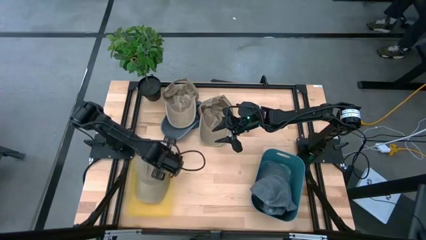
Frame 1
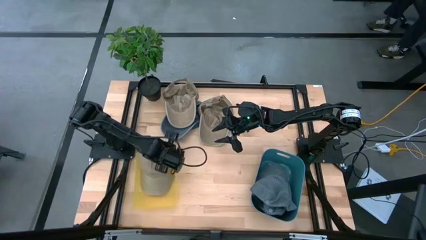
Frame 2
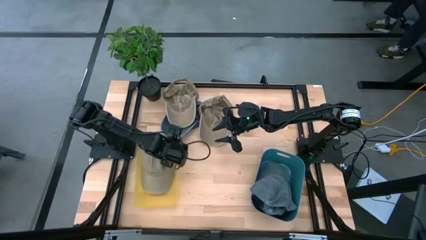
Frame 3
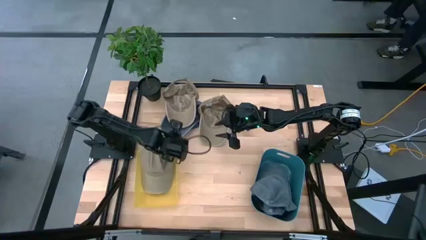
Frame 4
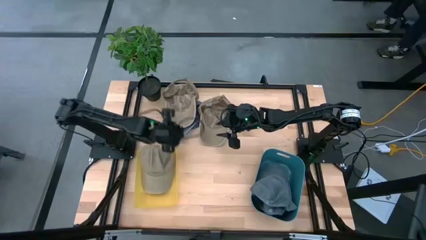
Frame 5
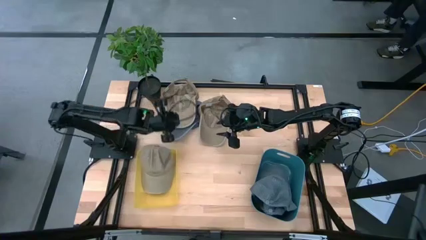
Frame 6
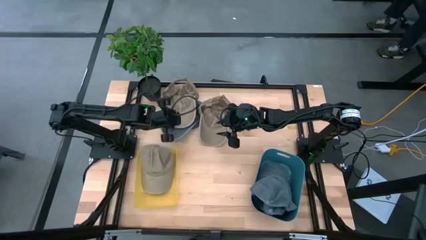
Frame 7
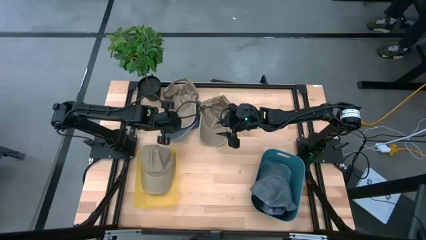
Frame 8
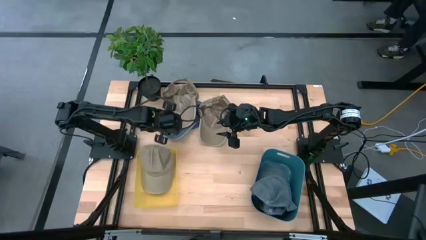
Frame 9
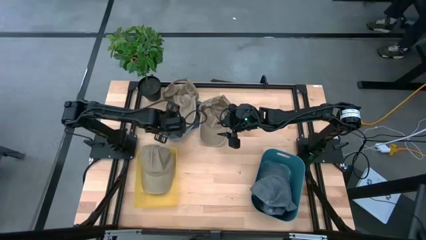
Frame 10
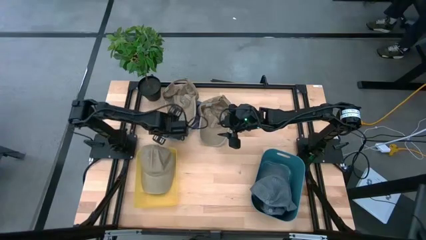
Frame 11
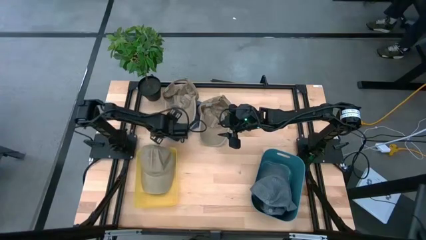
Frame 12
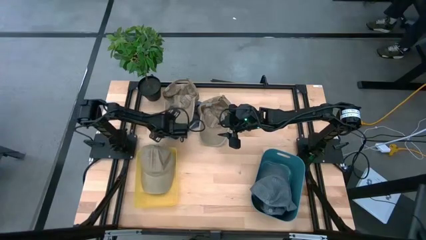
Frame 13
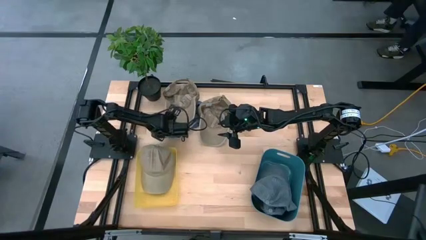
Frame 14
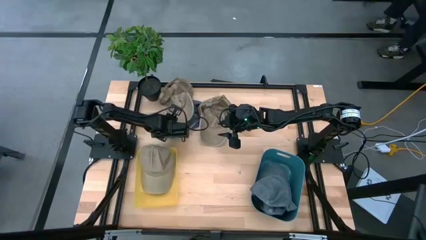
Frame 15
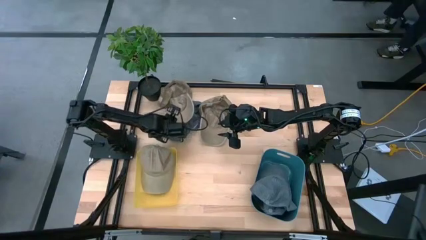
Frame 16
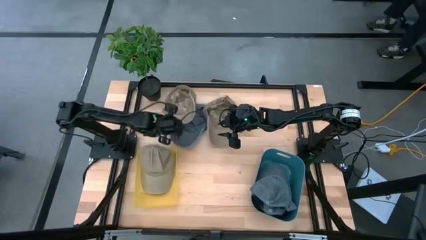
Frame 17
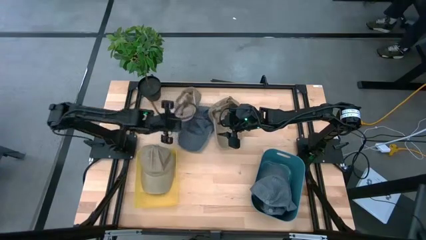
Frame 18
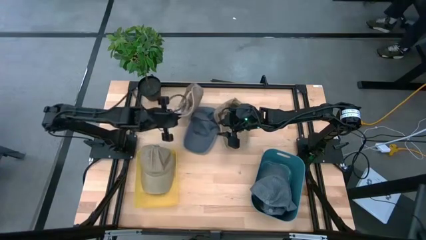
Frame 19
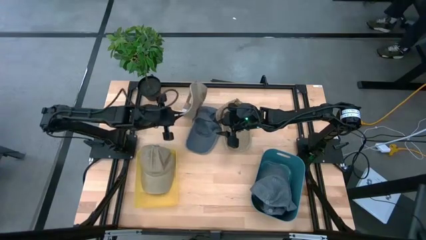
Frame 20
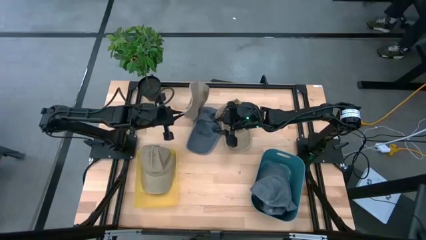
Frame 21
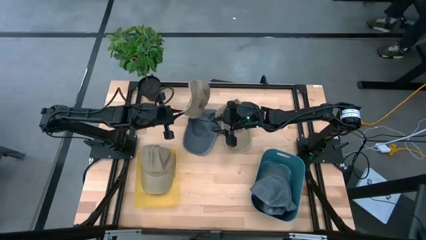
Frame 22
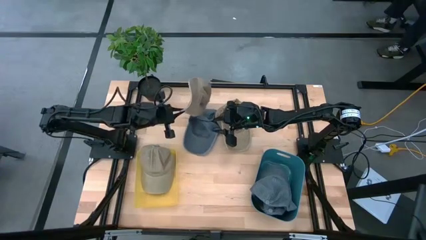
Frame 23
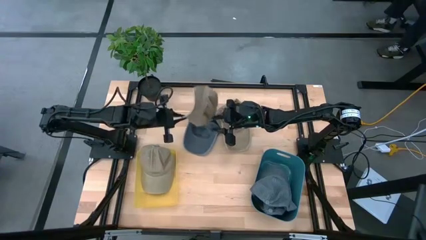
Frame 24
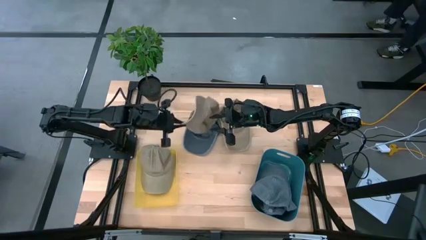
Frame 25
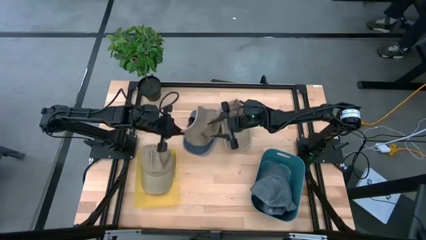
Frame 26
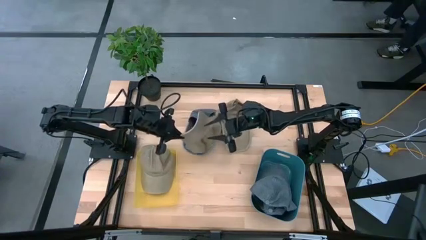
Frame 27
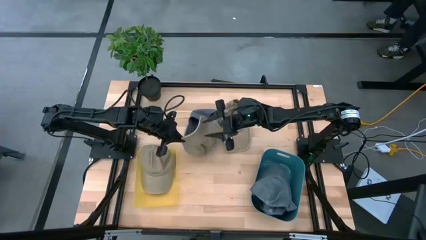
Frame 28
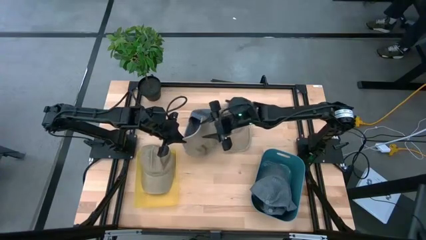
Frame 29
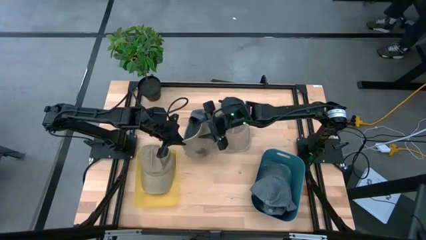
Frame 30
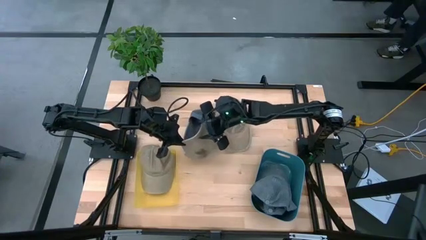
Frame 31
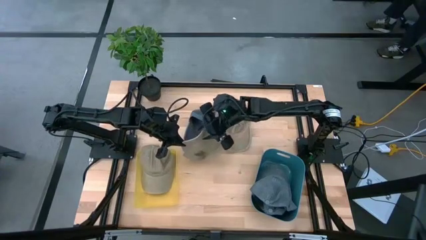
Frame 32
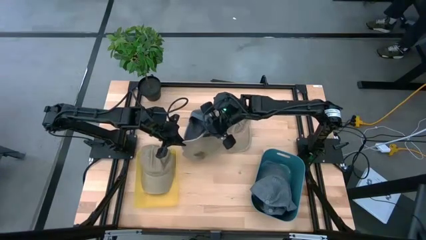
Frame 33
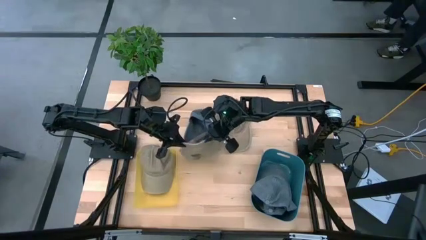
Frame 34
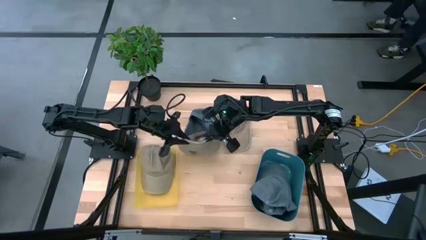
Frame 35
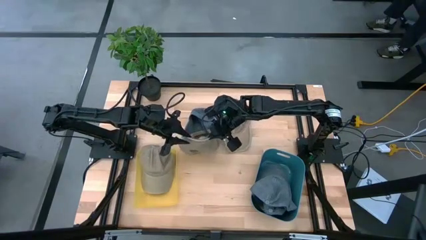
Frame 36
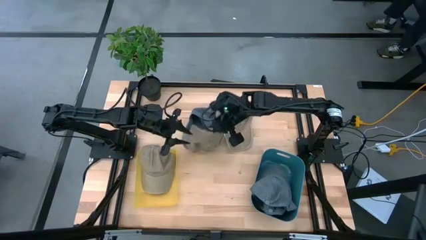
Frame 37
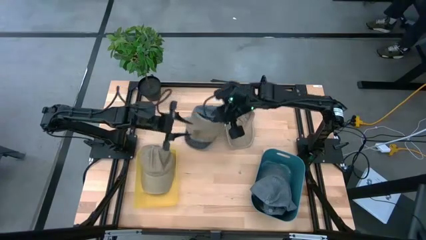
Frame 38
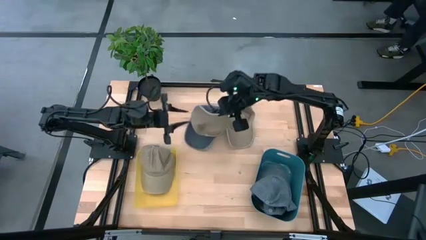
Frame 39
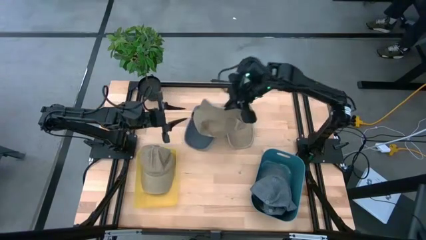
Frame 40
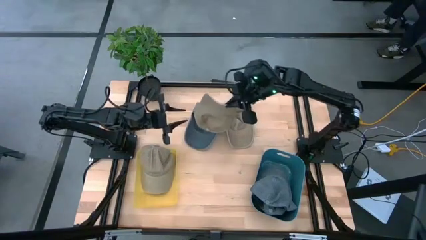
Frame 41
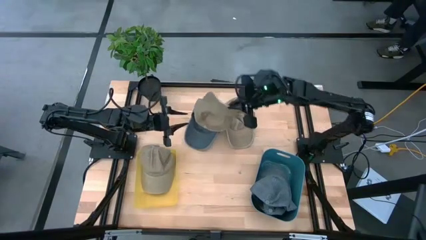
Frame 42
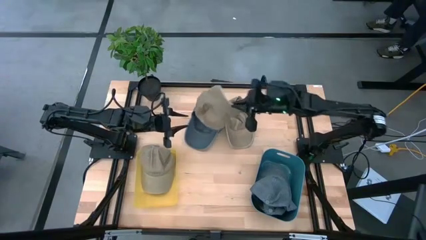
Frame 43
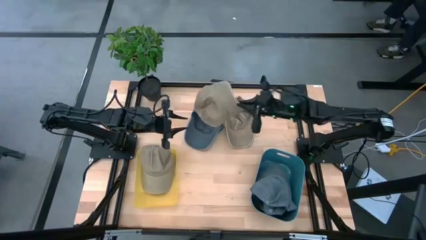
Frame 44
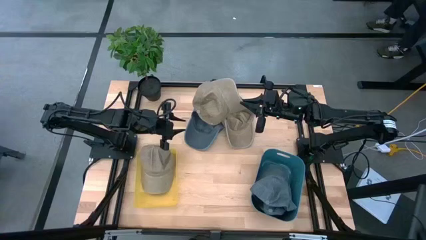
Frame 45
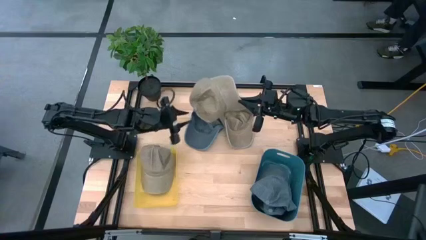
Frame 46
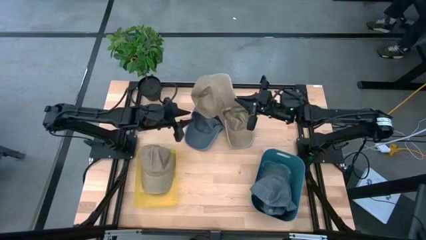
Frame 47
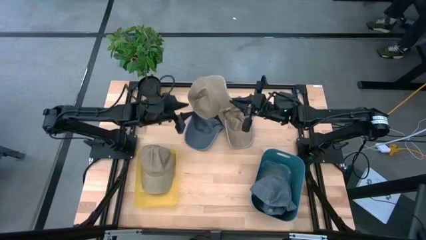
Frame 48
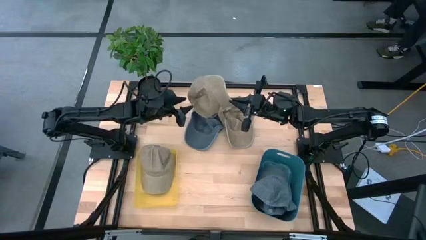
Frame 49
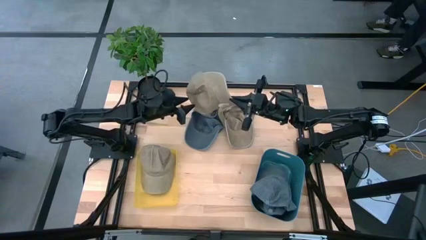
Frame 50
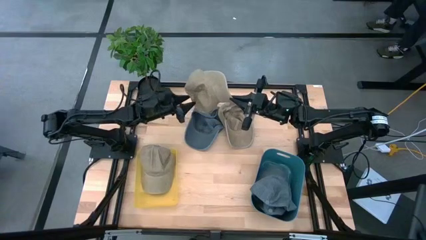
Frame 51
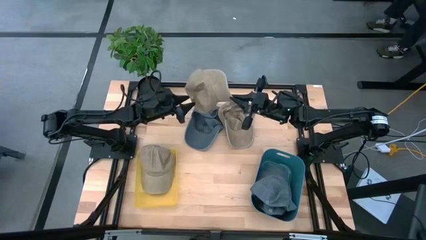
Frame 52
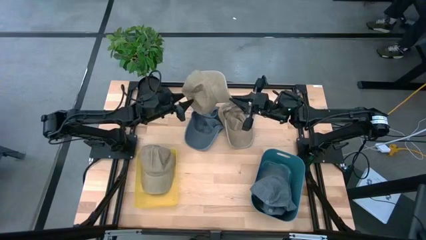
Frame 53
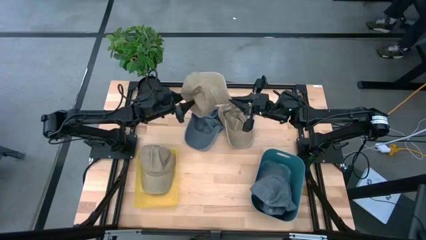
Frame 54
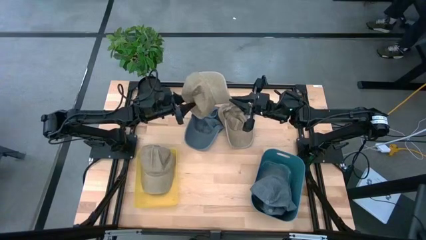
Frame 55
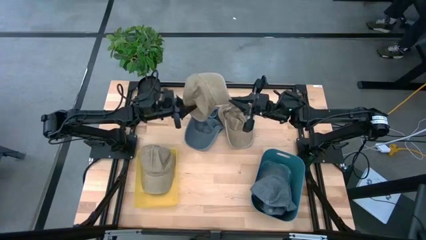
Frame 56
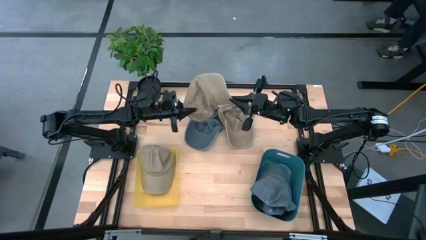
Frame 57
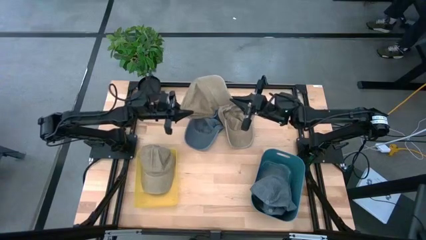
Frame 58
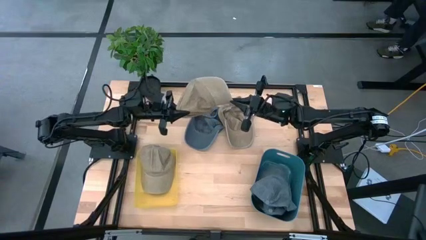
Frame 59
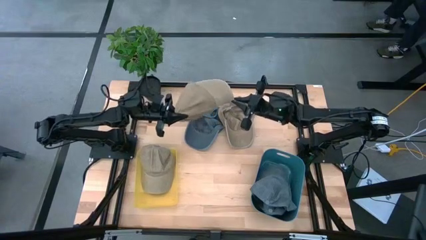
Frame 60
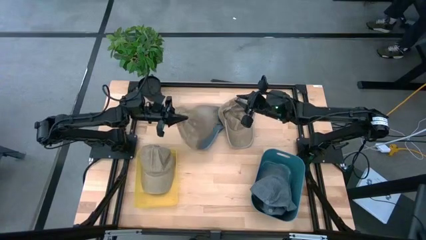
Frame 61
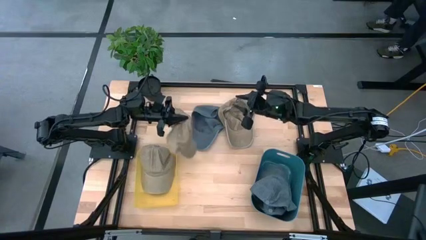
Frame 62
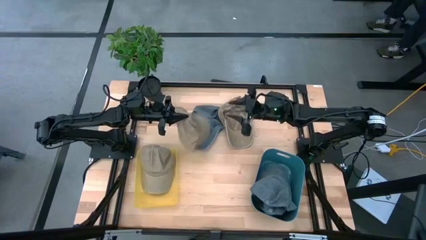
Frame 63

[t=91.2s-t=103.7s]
Task: Pick & Place hat
Put the left brown cap into the yellow bin

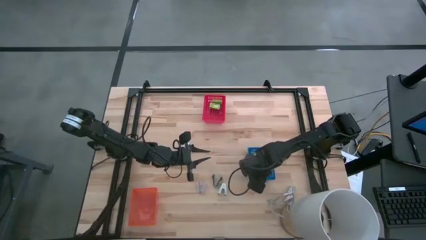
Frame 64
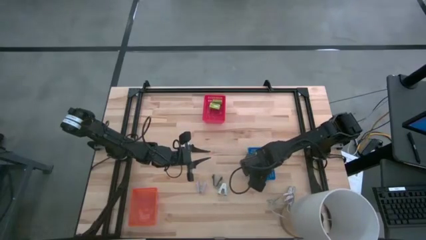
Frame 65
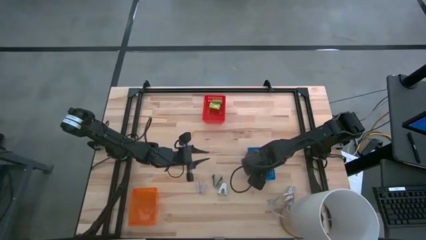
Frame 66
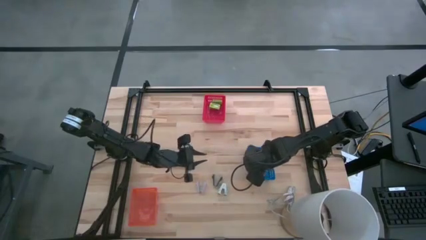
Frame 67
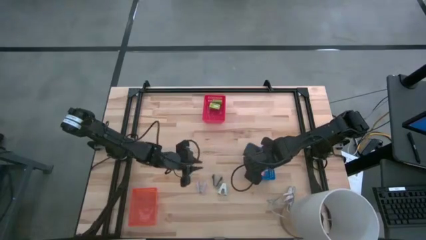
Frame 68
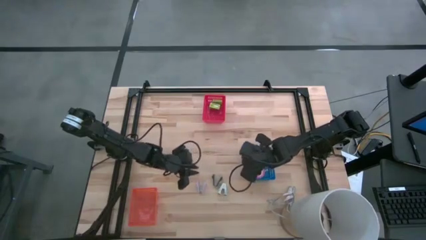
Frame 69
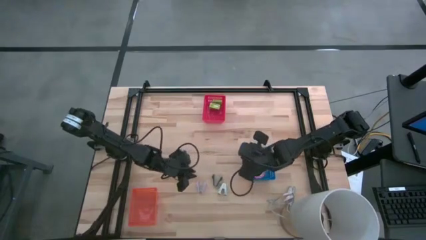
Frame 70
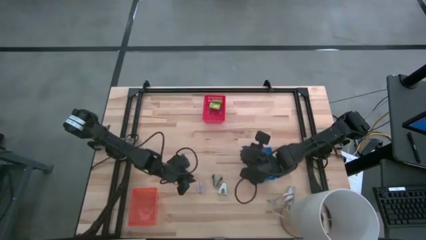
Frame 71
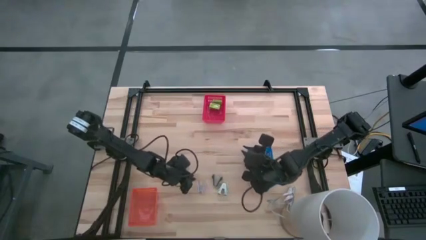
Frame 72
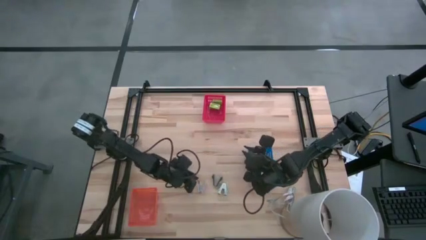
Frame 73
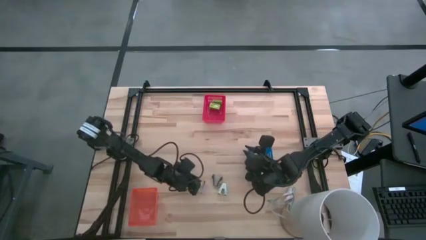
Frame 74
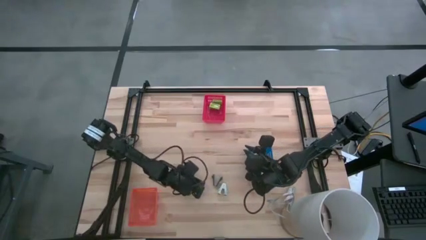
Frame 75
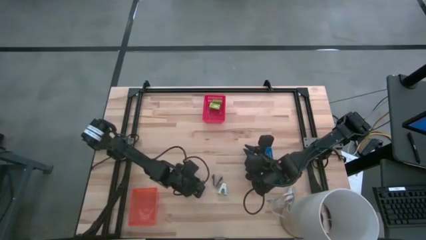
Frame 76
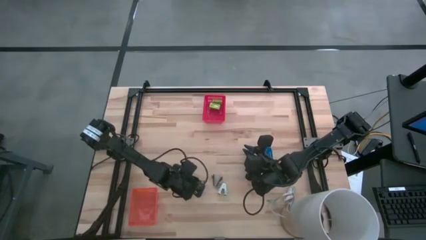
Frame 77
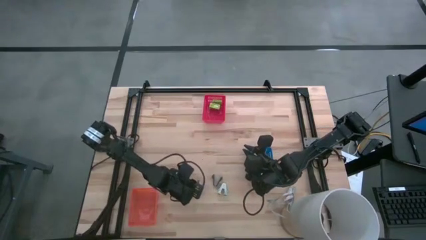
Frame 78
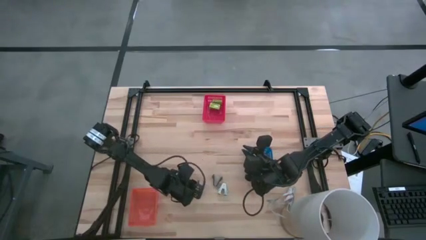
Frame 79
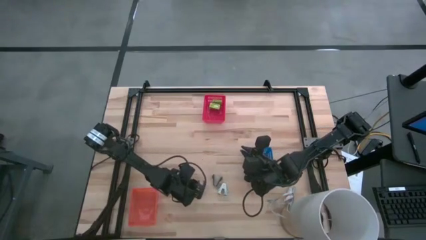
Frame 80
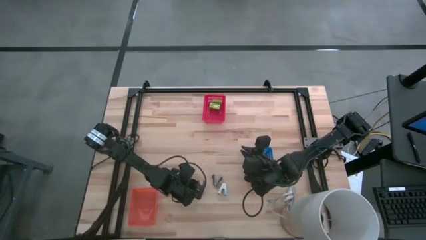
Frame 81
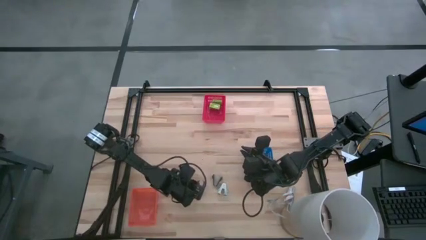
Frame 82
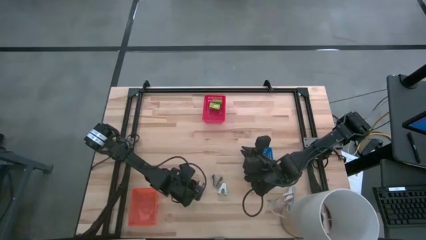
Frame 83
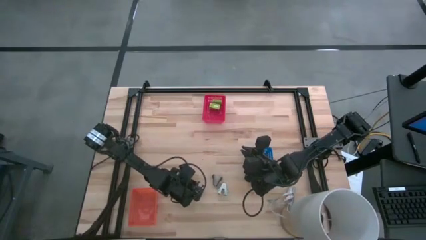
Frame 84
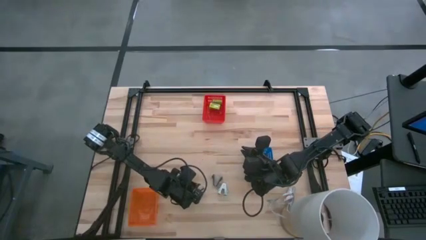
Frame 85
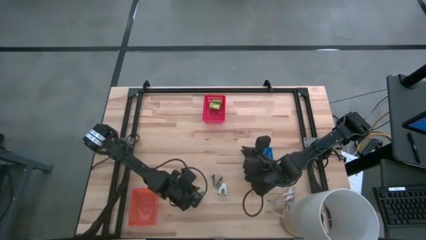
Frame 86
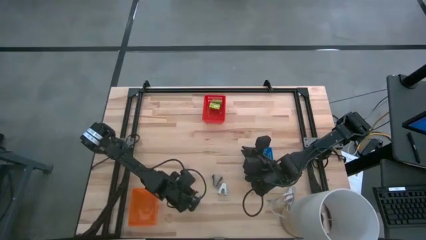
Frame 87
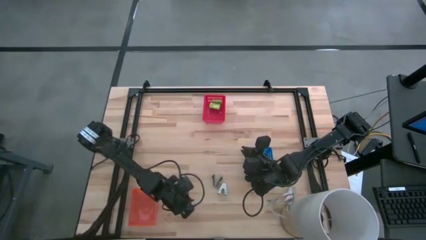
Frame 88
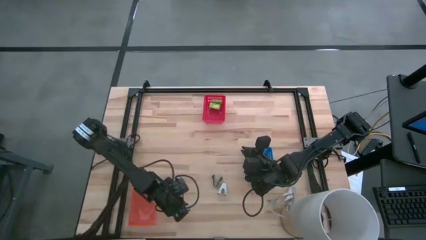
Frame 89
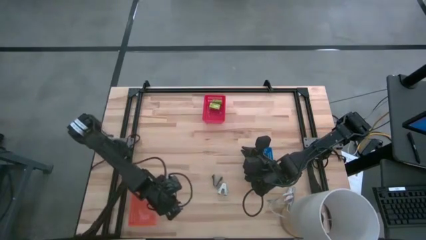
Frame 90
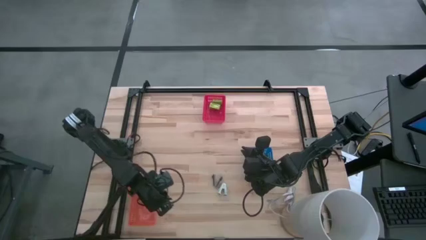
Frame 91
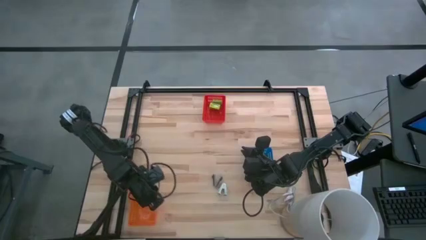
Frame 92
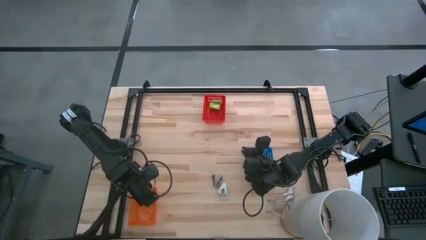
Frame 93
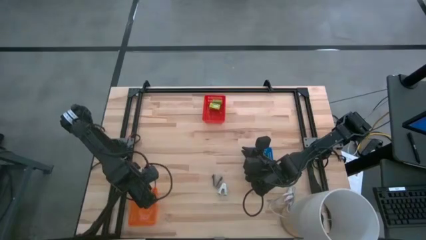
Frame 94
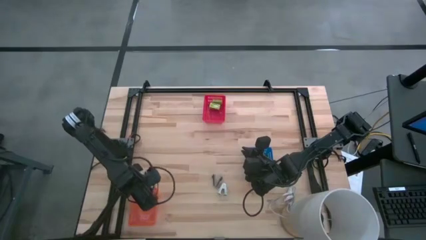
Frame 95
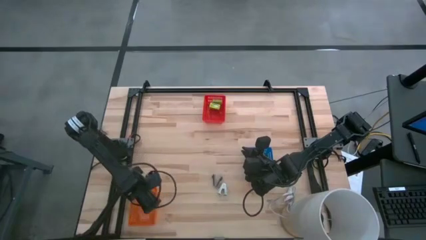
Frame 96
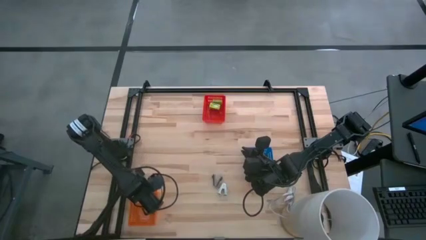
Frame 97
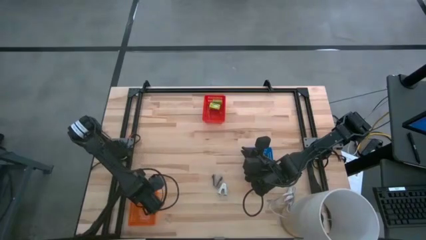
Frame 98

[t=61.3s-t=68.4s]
Task: Pick and place Stapler, Stapler remover, tape
Put the violet staple remover into the orange bin
